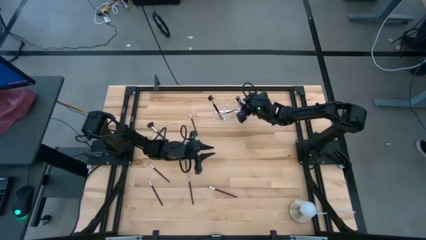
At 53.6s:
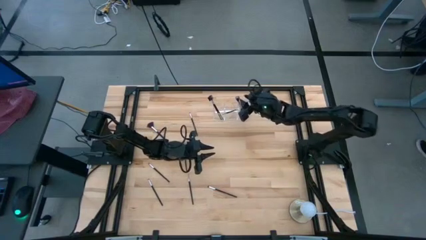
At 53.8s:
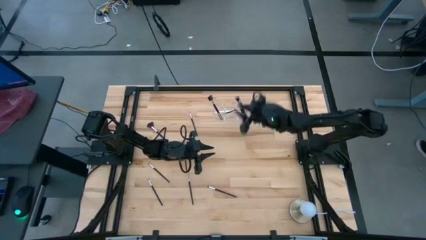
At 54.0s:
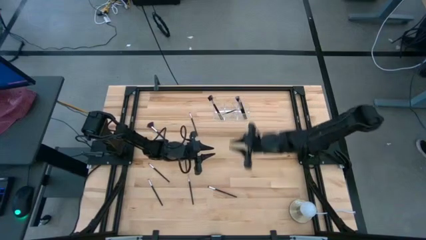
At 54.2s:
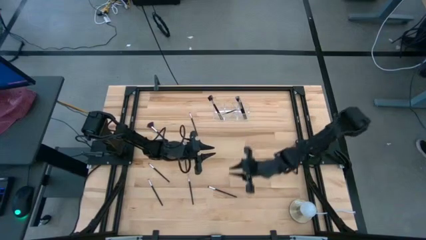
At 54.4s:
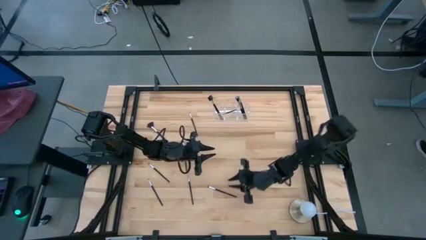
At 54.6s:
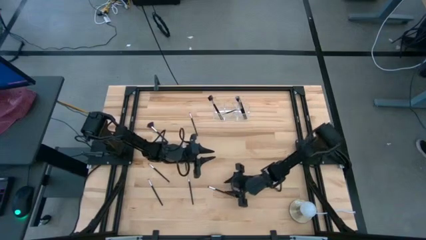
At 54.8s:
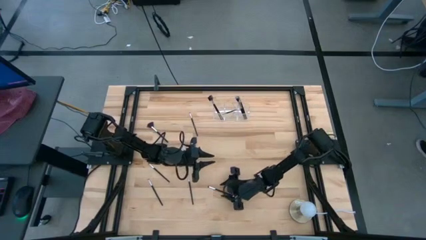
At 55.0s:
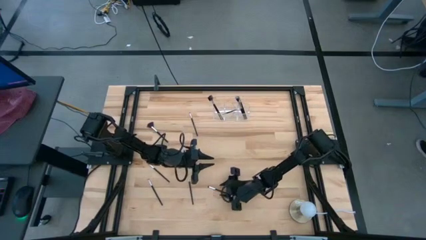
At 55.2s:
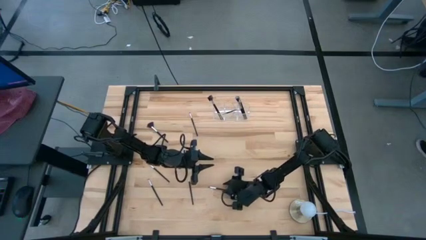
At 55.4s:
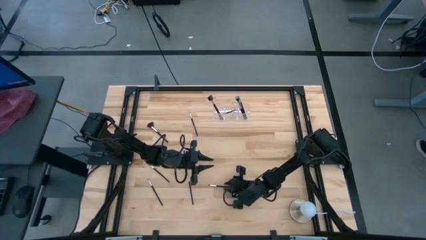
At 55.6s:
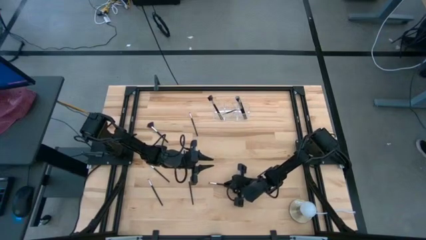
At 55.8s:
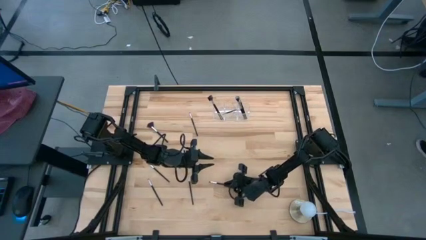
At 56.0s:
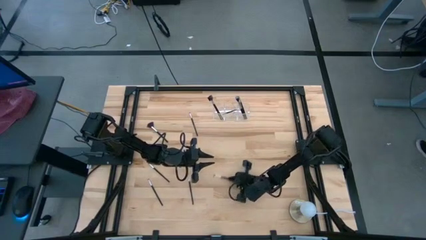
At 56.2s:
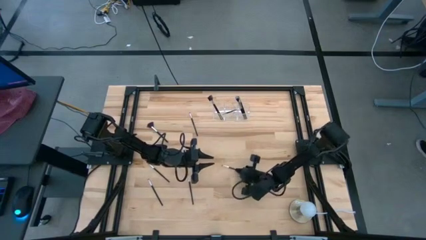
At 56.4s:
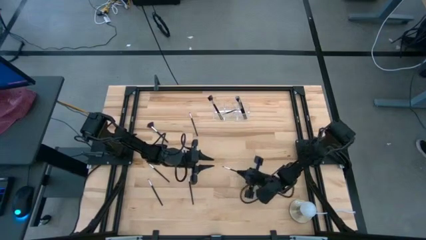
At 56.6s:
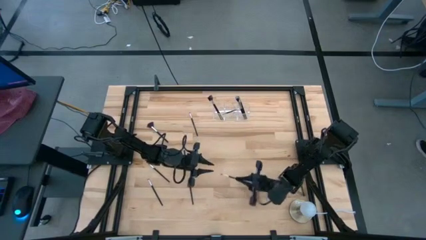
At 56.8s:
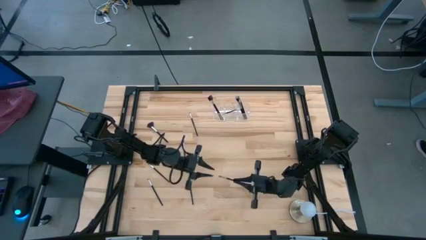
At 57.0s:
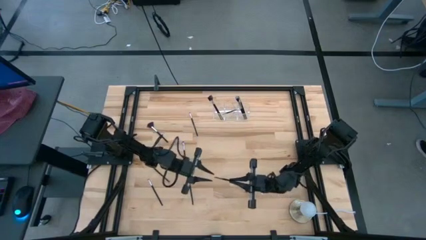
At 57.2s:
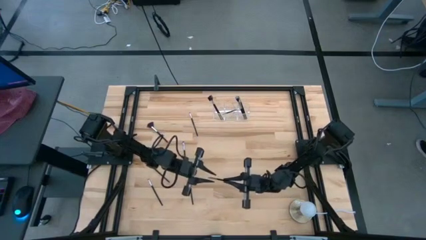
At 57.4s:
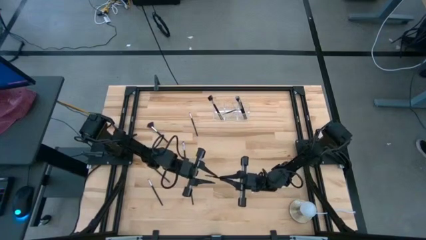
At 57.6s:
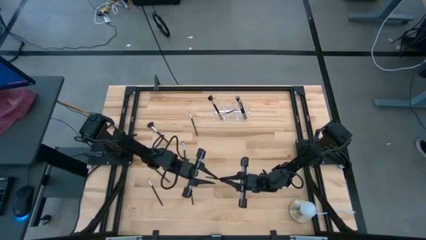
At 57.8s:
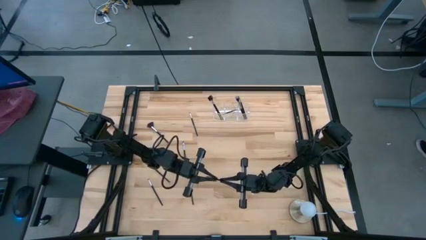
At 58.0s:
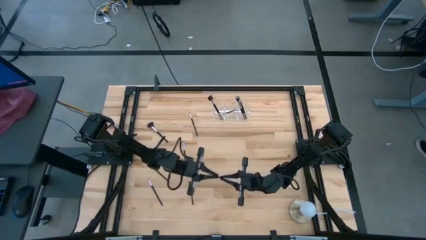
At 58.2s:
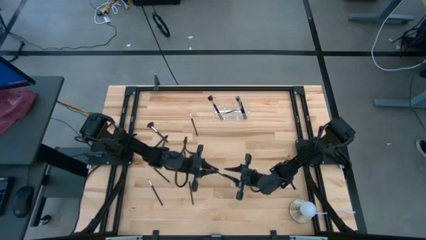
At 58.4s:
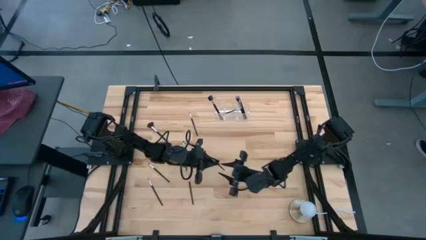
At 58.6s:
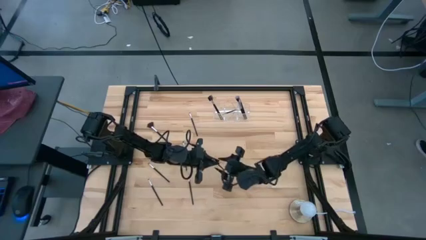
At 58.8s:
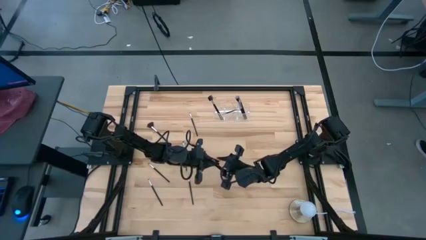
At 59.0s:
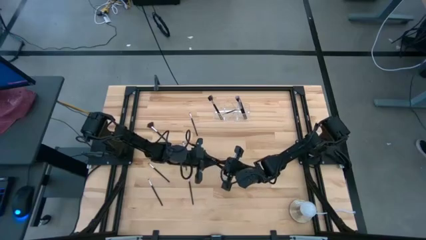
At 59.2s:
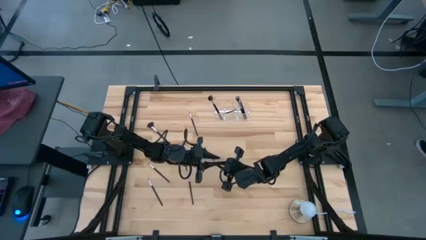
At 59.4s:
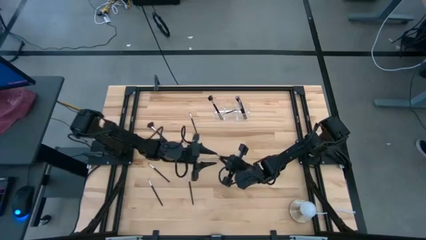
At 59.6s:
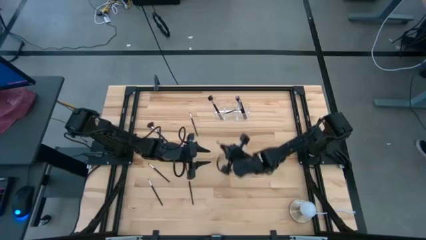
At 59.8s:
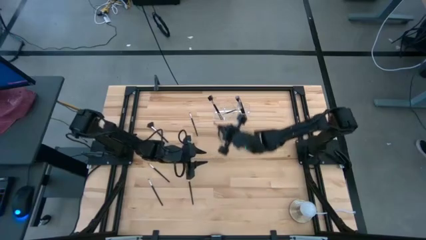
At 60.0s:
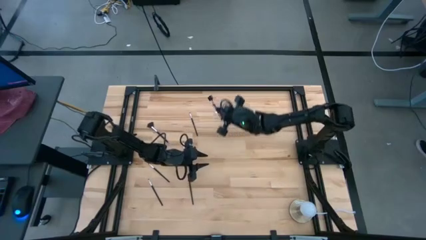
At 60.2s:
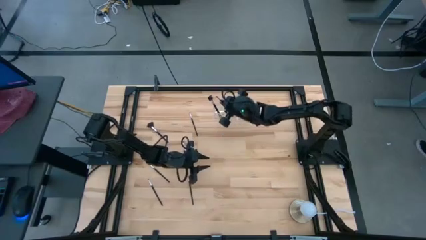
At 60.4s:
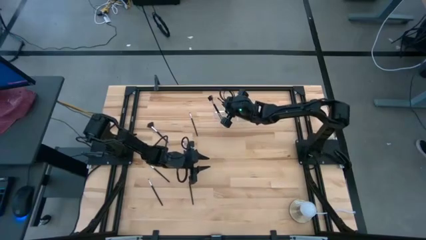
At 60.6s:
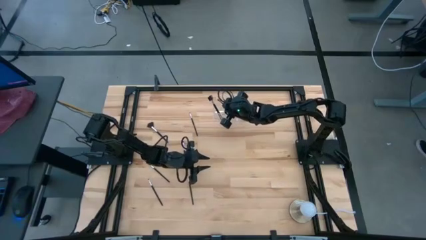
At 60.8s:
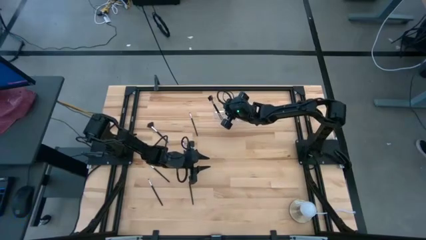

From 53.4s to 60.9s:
Task: Put items in baskets/containers
Put the black eyeshadow brush into the transparent organizer

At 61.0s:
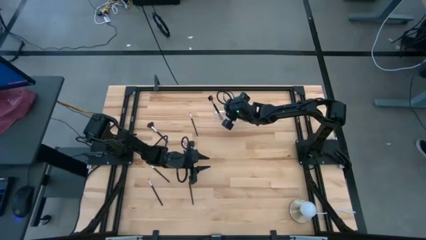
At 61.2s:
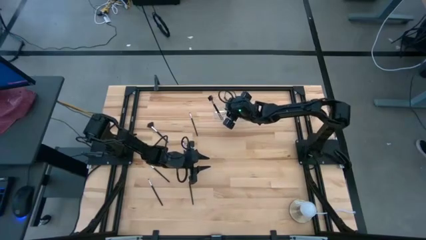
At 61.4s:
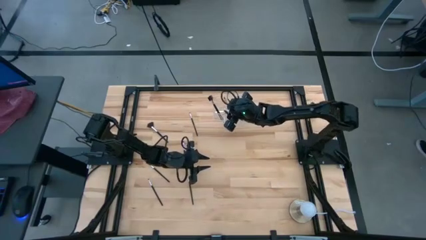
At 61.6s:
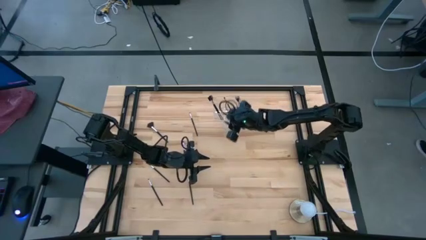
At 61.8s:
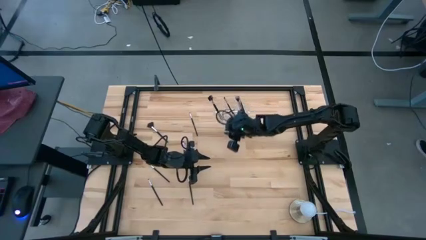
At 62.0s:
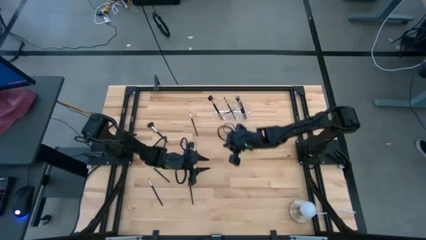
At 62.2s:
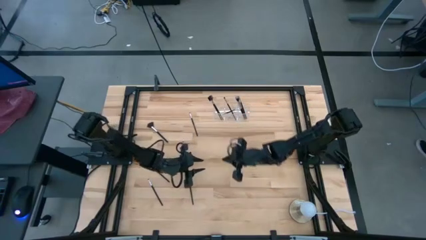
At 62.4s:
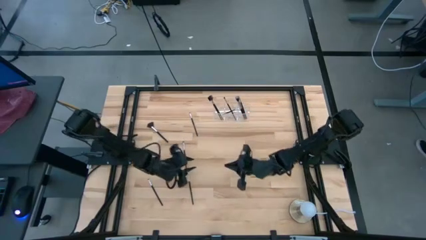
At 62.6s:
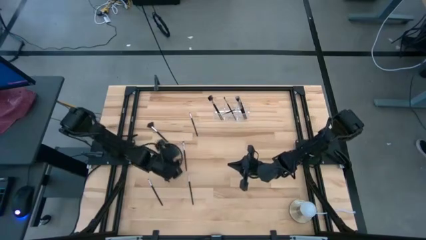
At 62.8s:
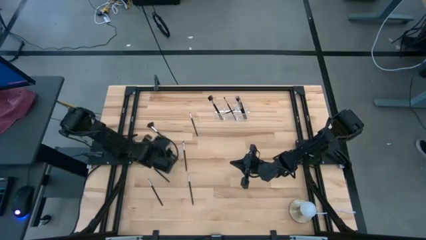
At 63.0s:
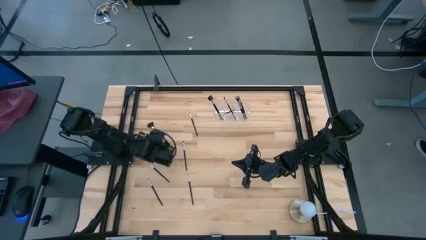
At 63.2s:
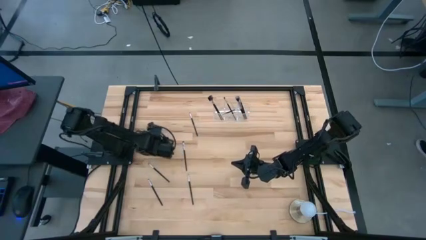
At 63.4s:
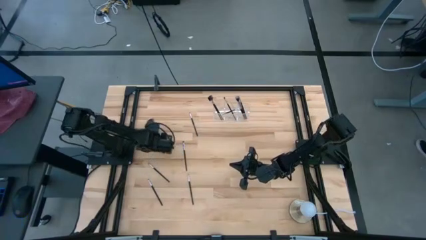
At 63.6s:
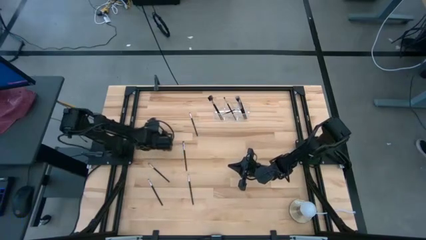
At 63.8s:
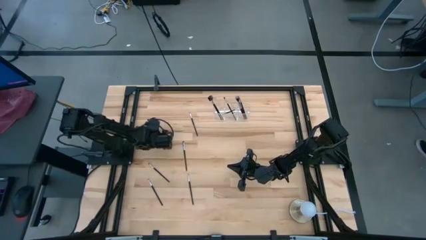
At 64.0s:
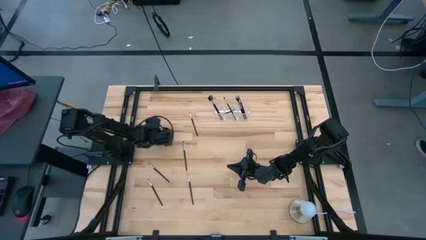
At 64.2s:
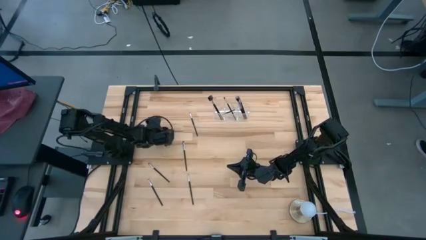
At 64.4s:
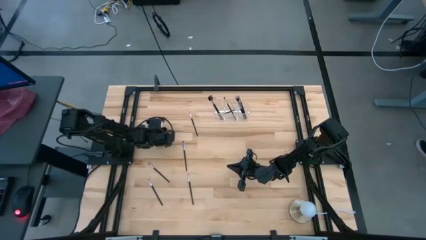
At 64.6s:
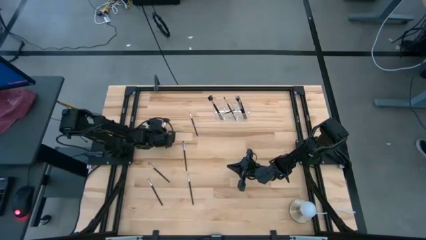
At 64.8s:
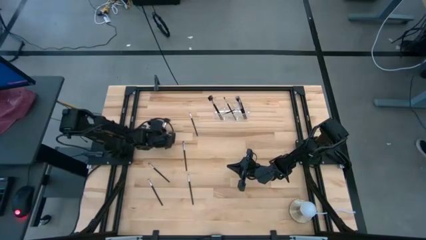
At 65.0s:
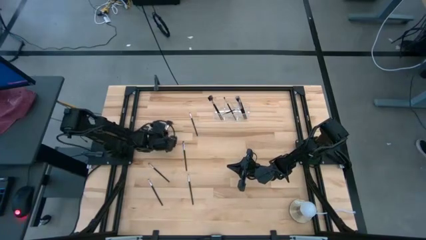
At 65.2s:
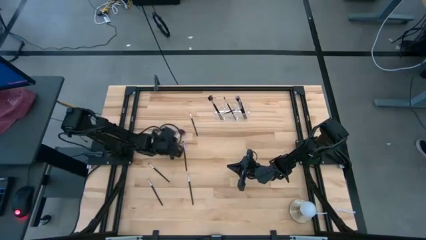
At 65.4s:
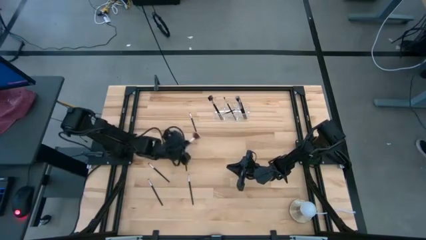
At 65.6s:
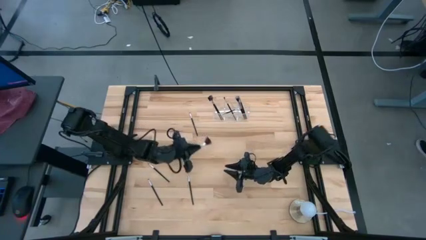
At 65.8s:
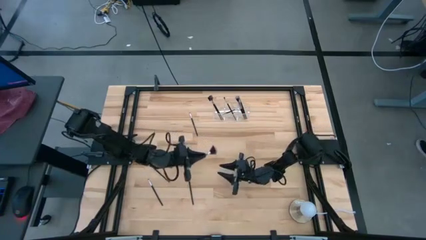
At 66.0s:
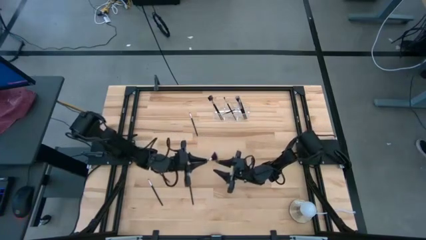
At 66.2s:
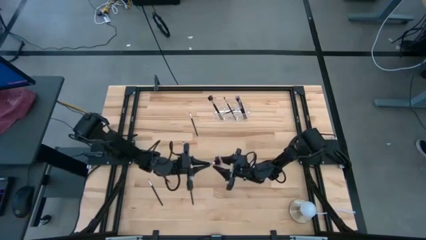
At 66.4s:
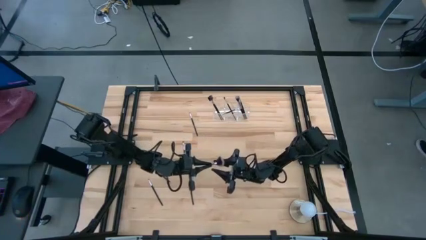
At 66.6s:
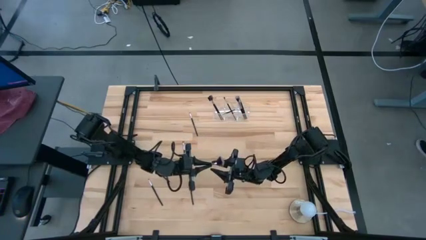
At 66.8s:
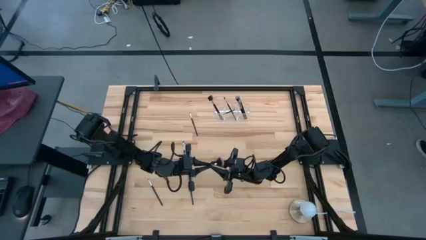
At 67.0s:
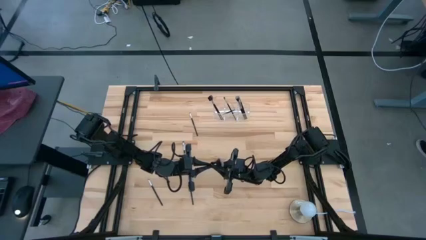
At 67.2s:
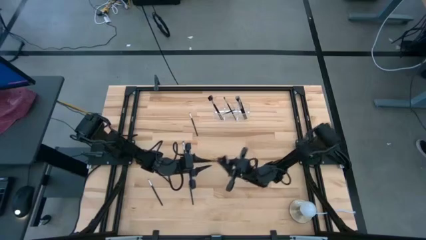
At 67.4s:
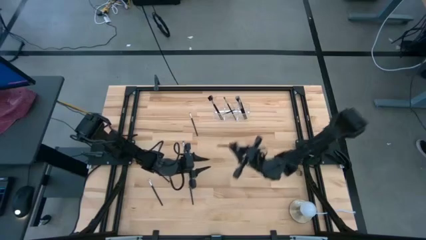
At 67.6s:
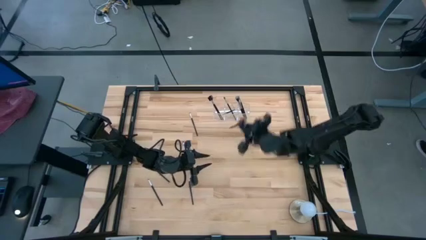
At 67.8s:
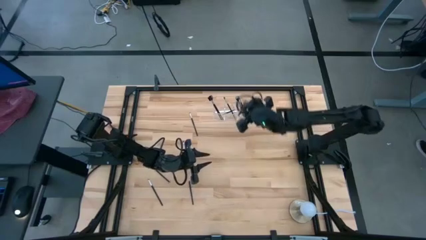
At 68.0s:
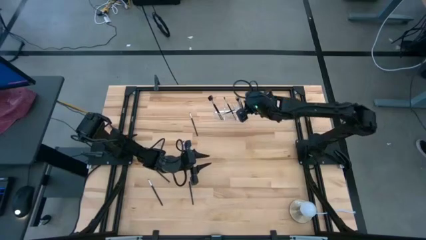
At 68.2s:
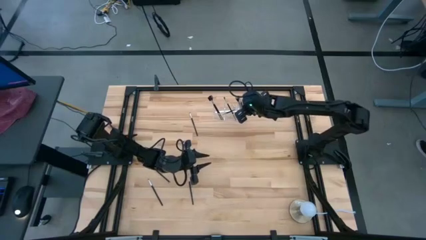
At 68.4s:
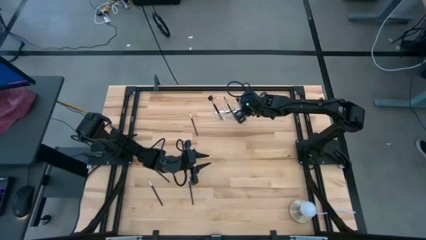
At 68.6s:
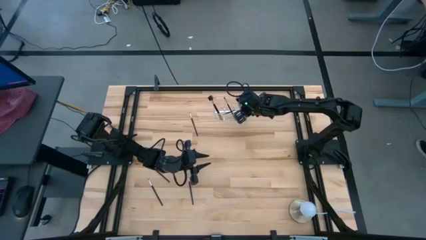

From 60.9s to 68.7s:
Put the black highlighter brush into the transparent organizer

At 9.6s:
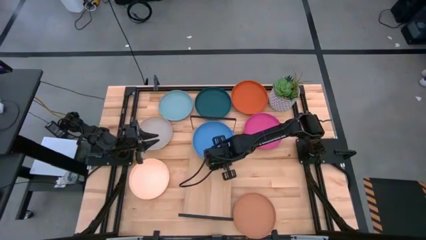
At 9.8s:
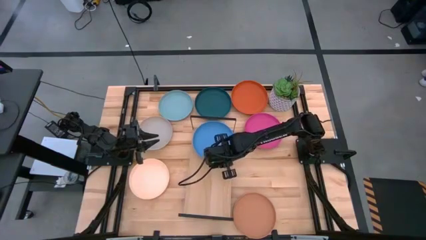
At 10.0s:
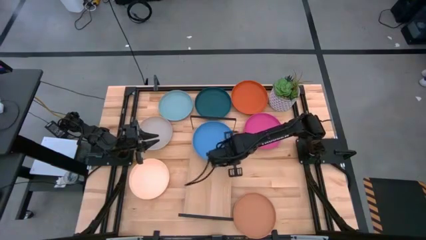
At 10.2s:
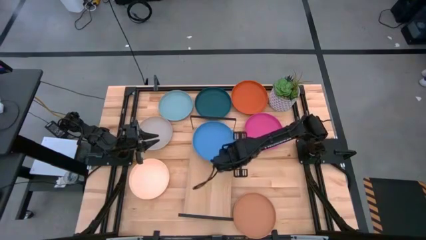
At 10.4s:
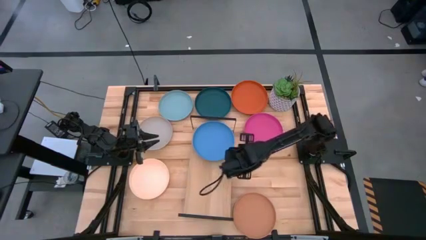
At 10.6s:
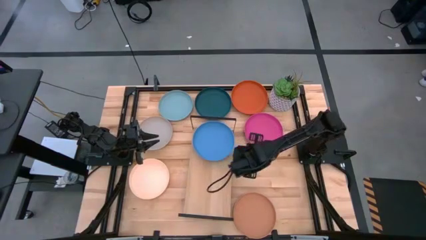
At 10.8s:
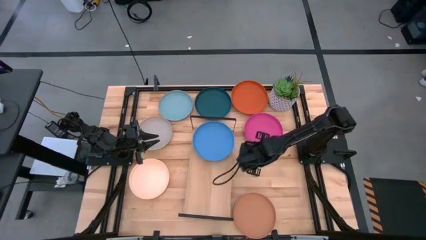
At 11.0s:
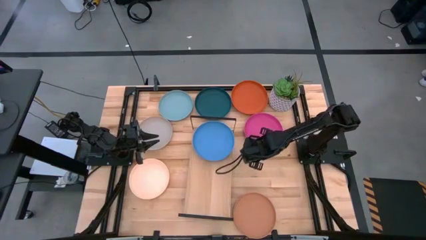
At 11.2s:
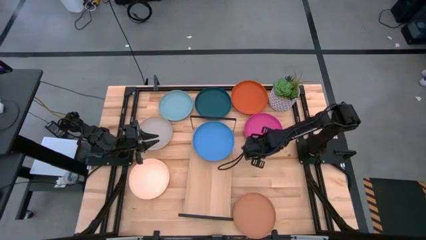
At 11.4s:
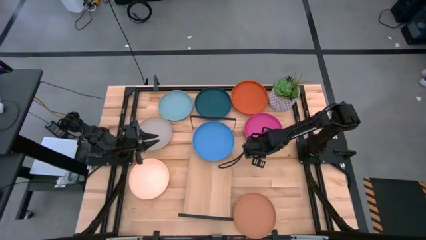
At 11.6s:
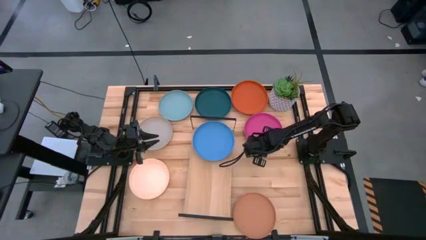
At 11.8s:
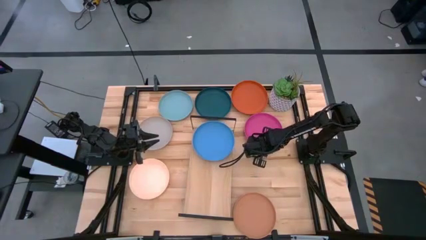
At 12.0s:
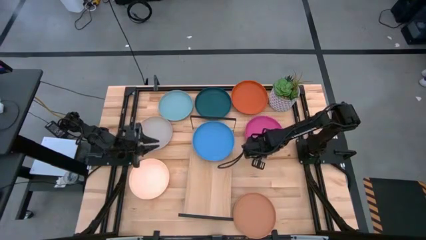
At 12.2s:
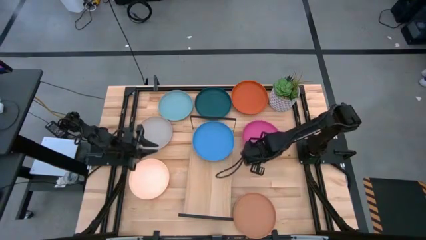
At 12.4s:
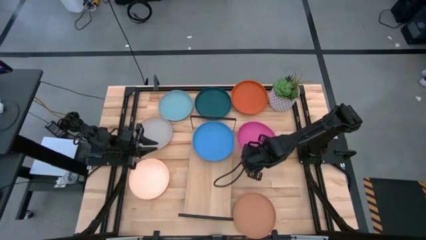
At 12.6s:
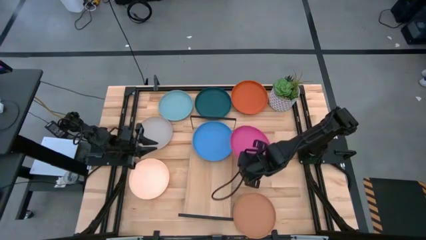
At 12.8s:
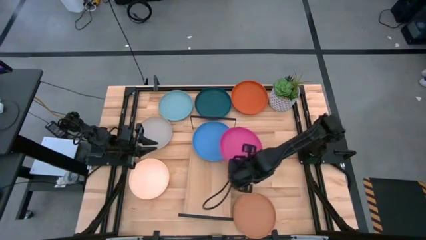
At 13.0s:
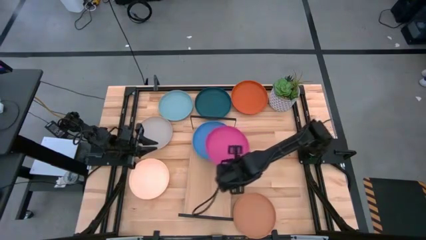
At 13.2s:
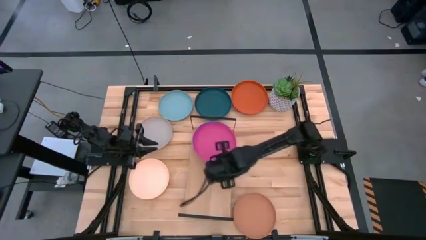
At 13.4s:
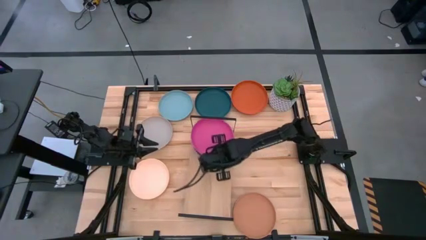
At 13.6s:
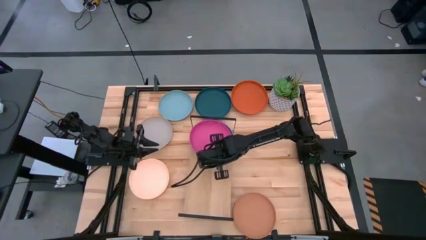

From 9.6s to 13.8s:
Task: Place and stack plates onto a shelf
Stack the pink plate on top of the blue plate on the shelf
